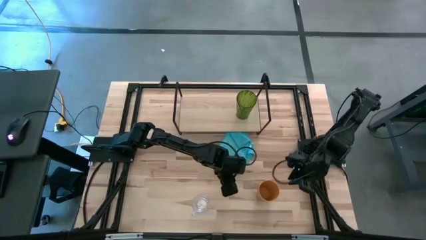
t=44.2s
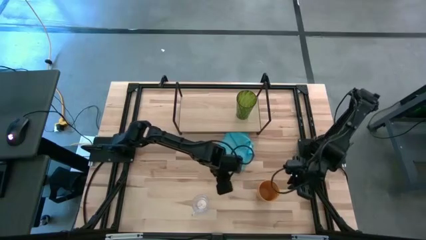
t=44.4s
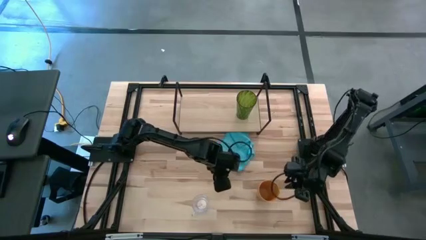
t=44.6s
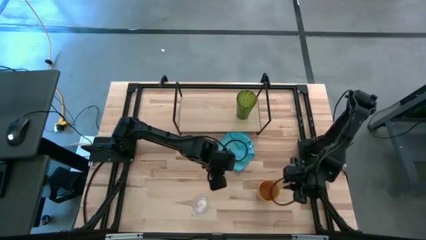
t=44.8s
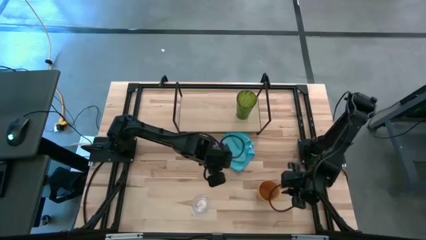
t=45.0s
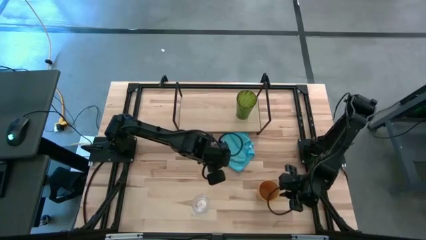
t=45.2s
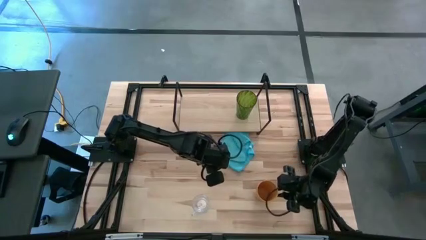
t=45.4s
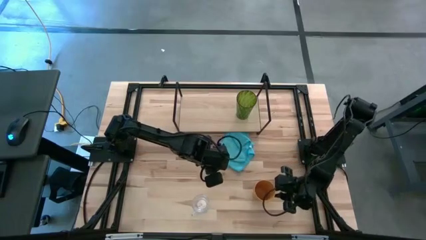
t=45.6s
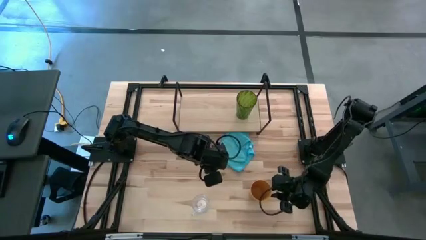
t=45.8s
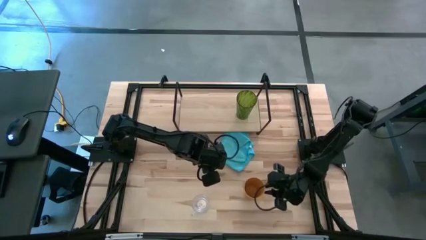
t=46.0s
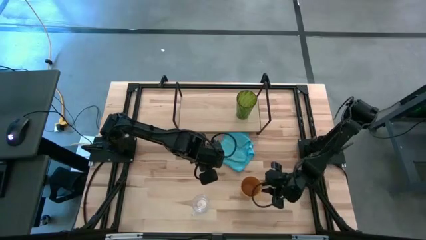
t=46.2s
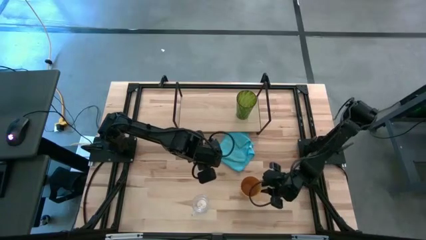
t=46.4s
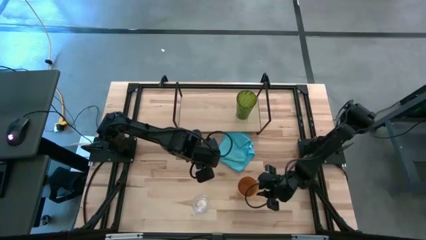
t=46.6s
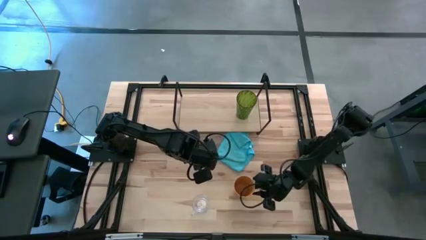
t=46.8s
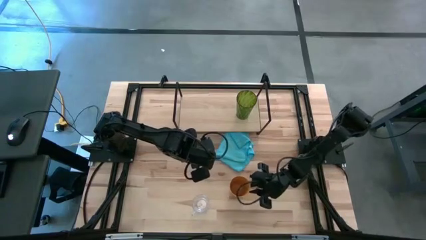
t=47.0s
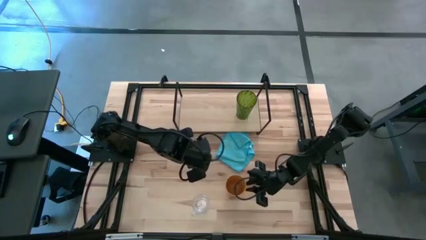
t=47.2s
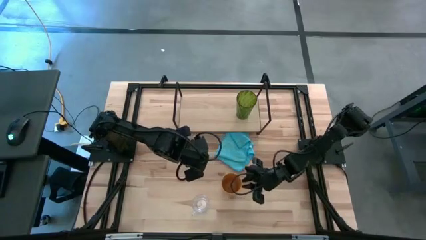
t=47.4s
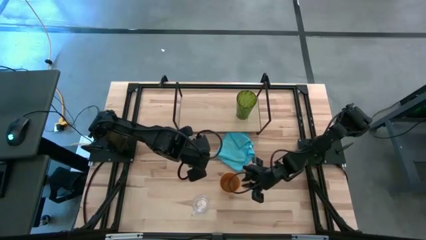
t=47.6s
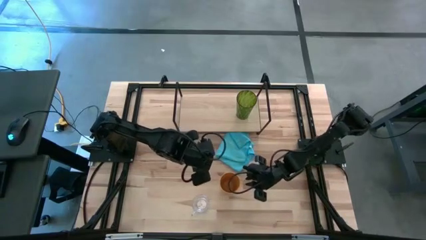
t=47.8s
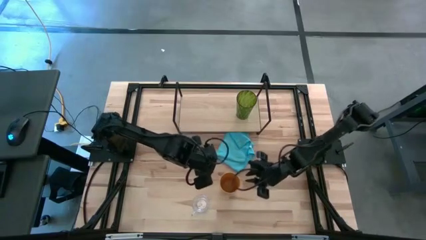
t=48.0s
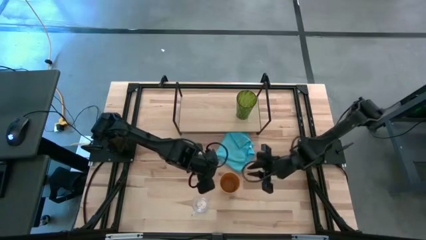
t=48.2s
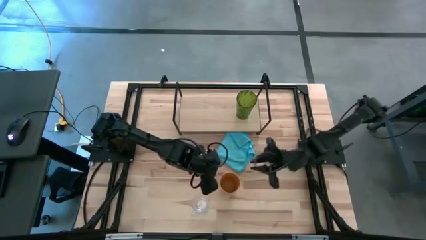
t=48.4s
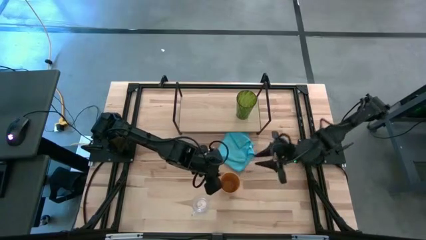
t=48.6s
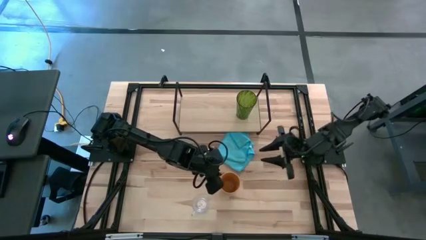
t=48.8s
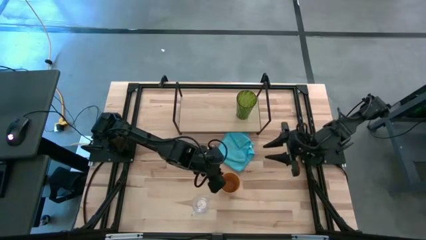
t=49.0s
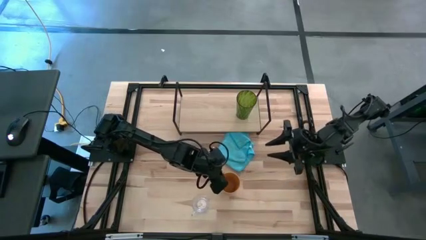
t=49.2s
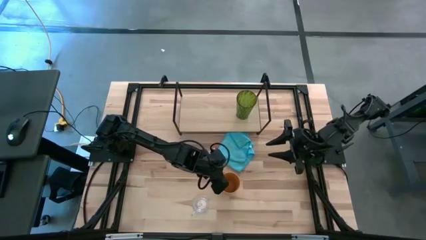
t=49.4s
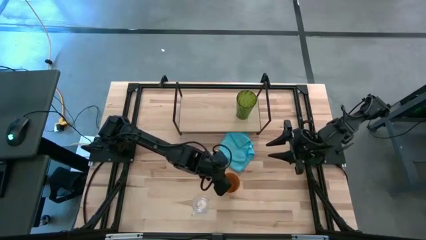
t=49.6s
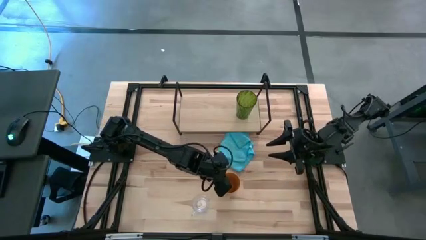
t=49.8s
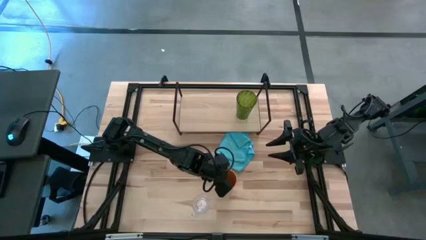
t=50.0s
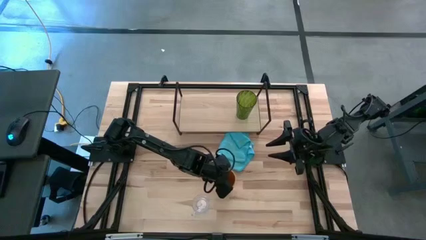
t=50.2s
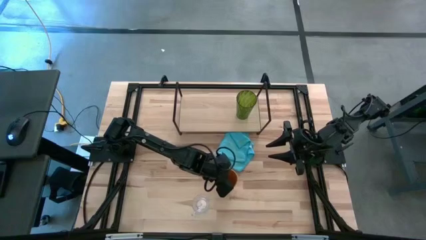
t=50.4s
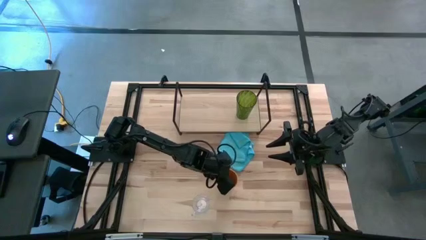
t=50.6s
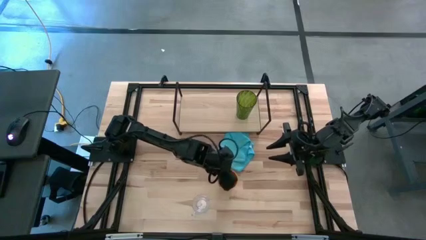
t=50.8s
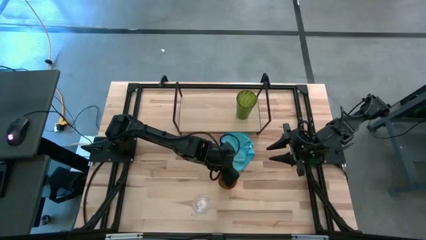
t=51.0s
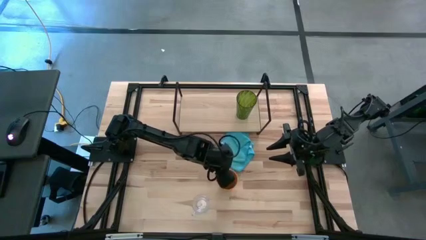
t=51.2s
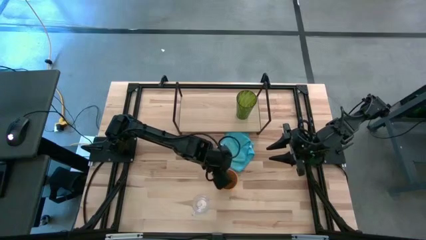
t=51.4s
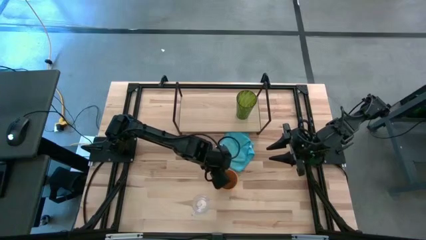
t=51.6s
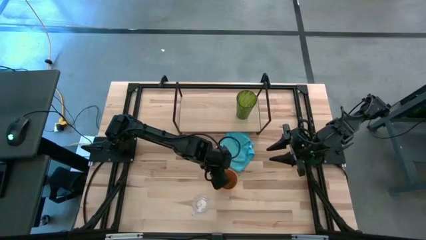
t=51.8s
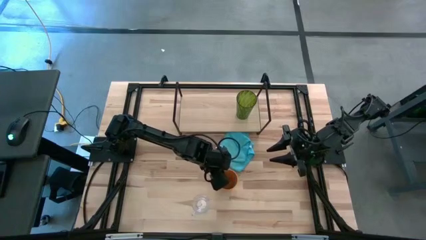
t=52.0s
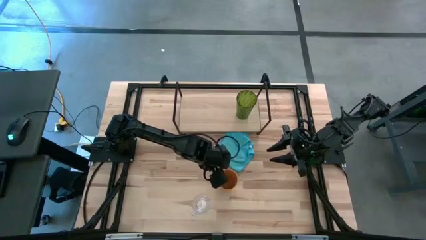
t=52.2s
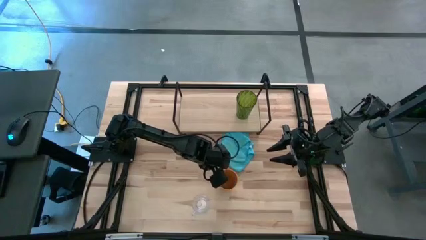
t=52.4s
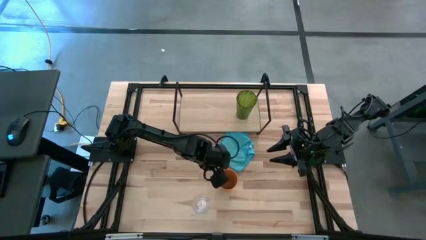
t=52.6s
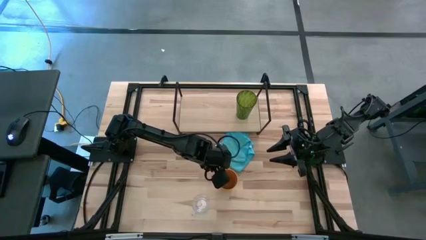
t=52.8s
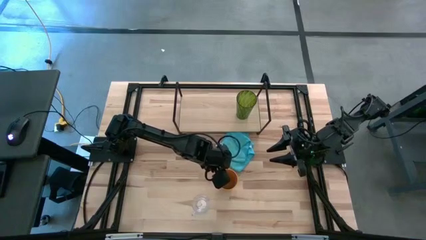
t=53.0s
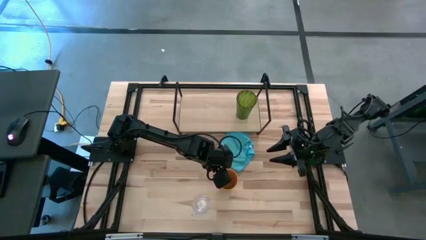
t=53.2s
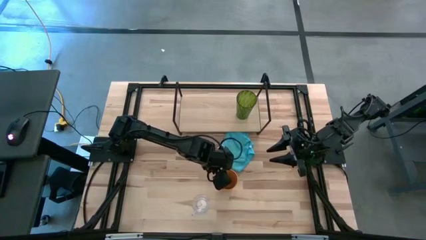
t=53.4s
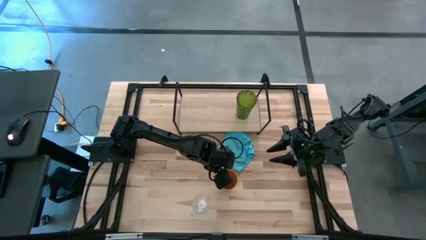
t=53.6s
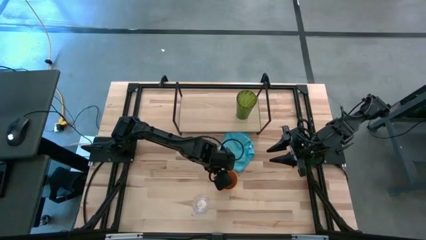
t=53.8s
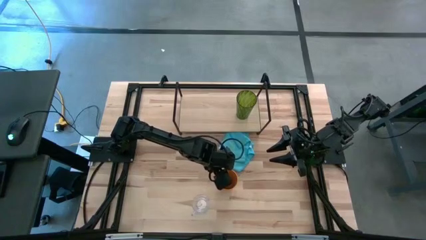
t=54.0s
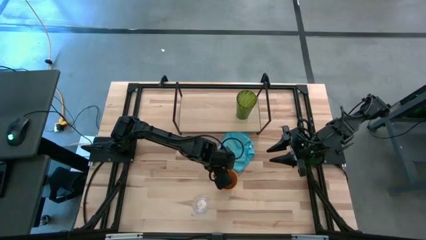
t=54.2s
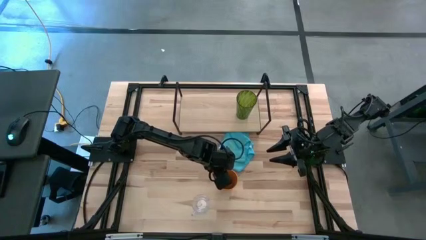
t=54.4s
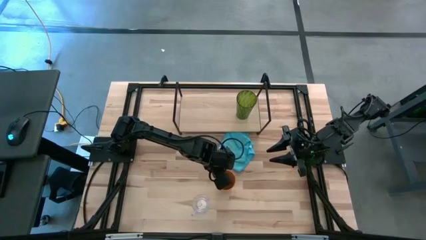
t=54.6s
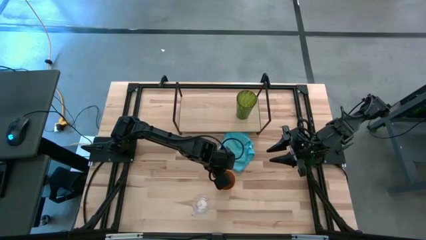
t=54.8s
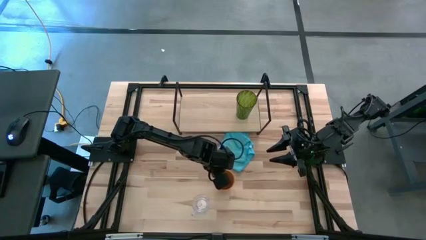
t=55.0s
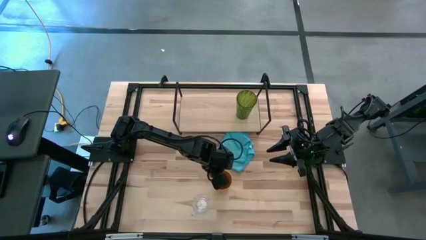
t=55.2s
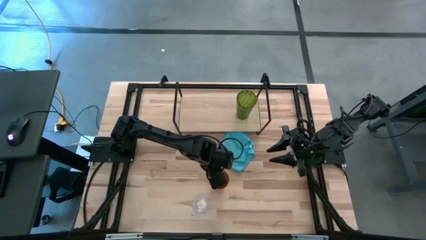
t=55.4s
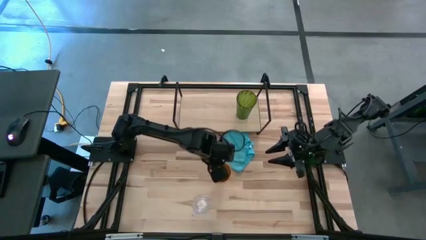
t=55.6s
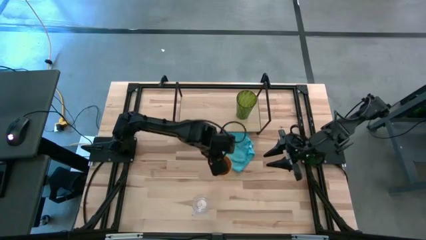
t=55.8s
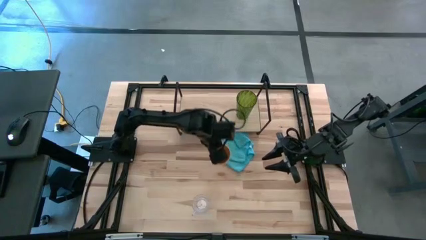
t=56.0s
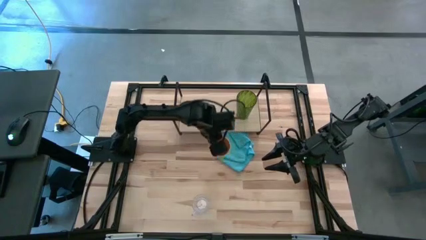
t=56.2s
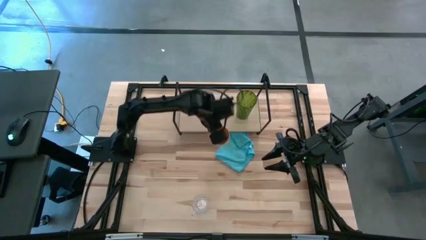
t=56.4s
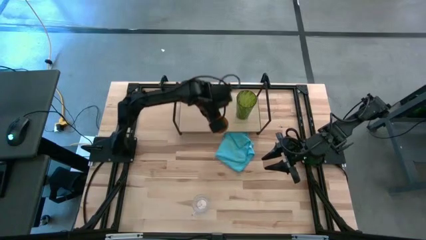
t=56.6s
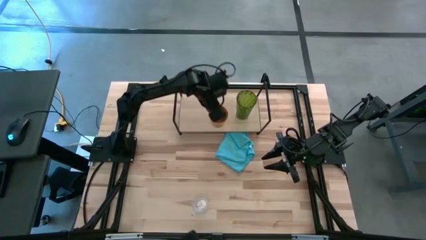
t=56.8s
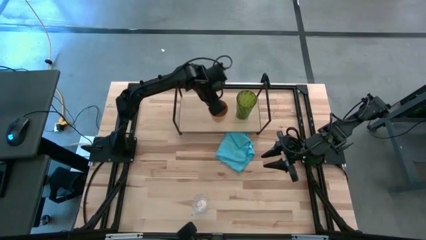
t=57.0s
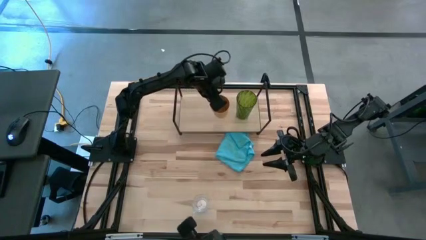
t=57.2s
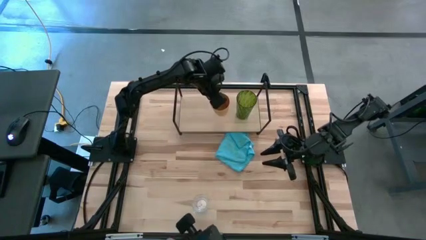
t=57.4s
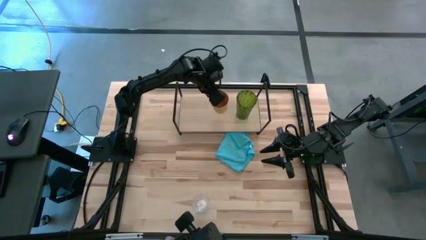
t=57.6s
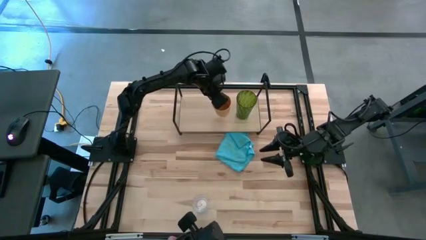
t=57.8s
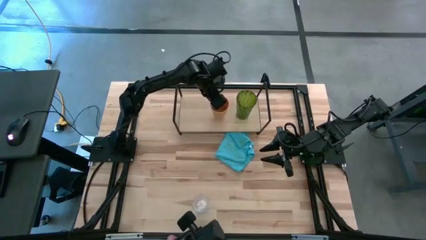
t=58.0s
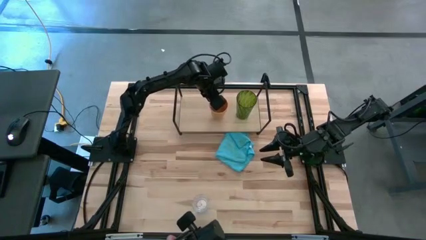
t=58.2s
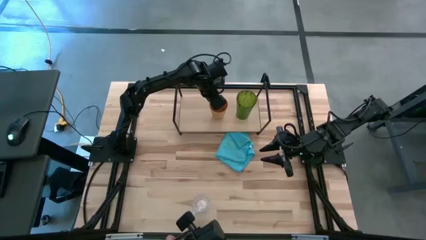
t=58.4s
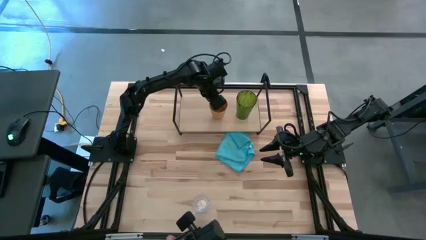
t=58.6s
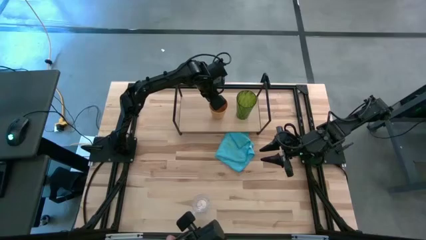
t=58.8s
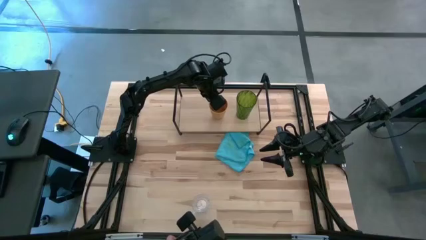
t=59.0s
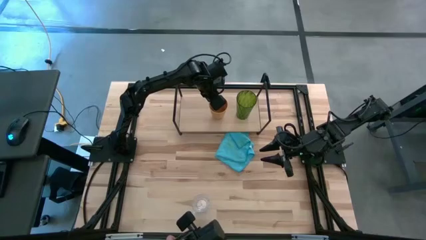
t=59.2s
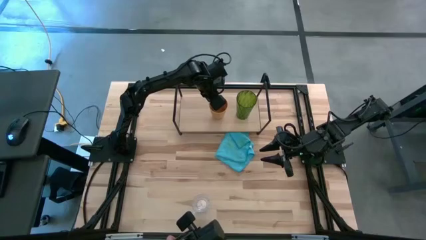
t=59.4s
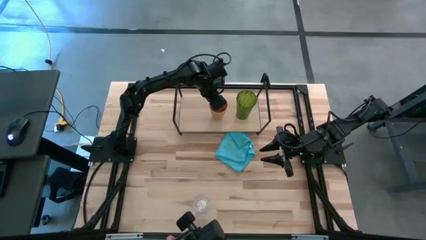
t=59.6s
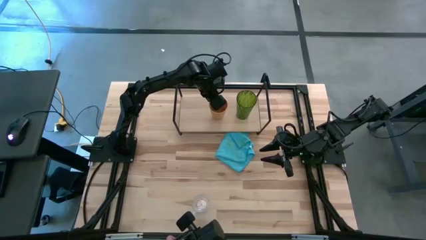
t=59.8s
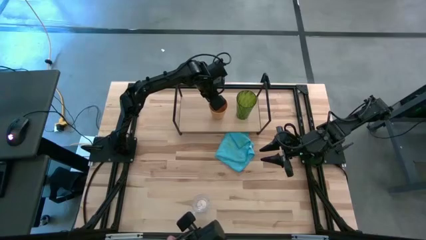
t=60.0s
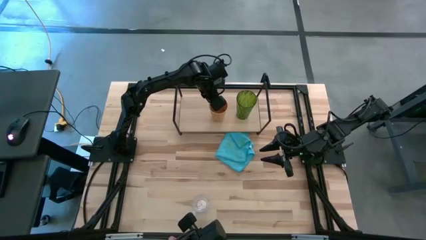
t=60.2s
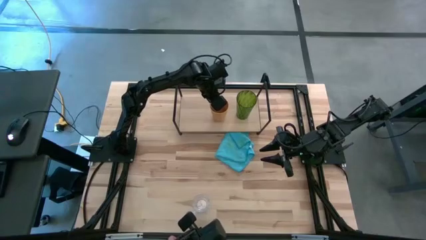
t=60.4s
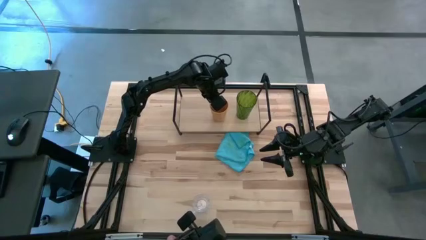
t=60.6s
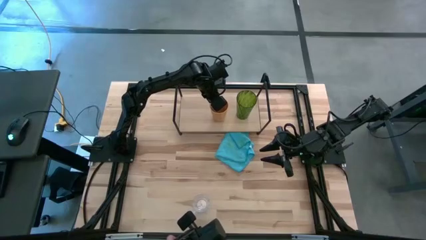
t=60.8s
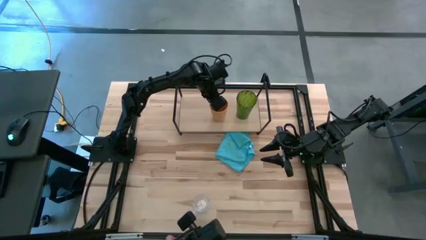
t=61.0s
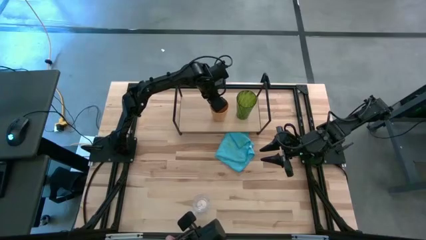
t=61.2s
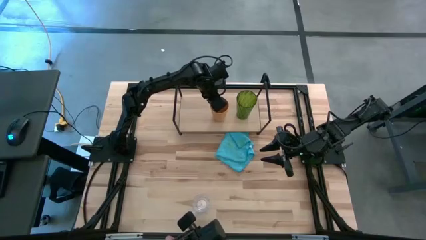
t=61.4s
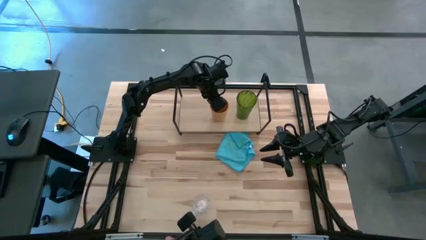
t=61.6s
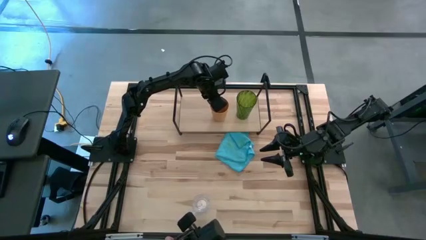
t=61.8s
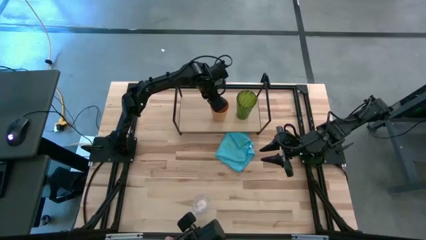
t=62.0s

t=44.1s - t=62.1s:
Task: Stack small to large cups/mugs on shelf
Put the yellow cup on the shelf
